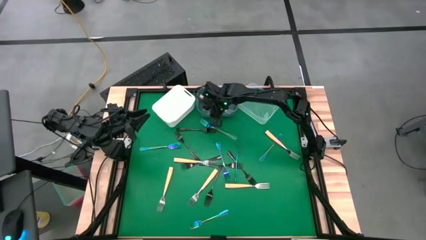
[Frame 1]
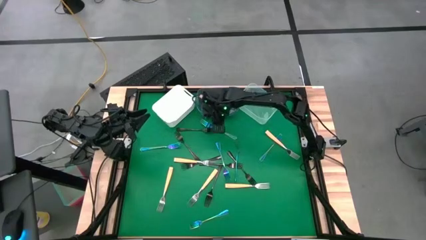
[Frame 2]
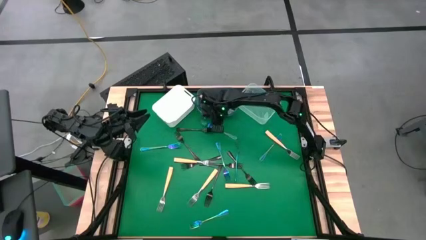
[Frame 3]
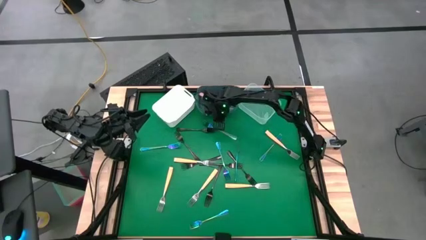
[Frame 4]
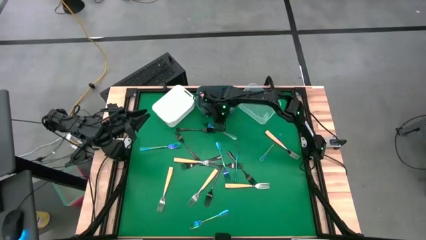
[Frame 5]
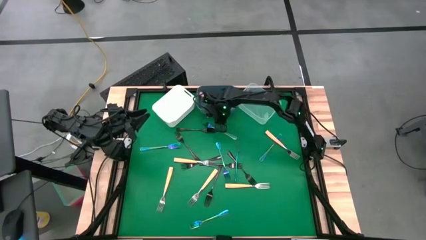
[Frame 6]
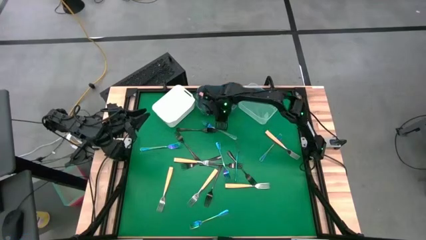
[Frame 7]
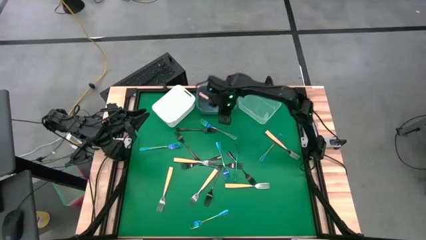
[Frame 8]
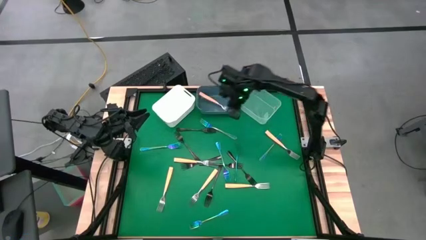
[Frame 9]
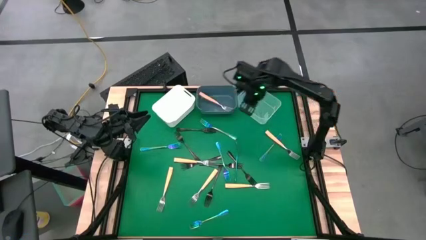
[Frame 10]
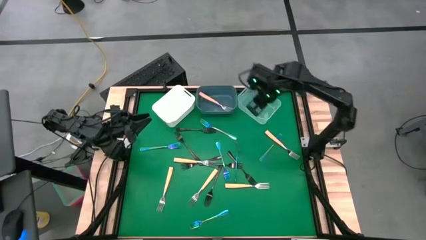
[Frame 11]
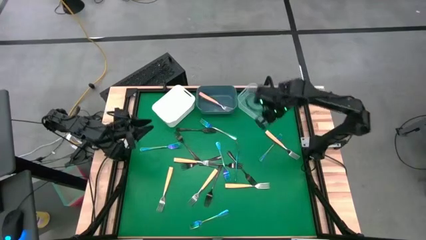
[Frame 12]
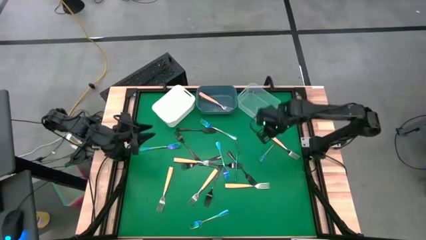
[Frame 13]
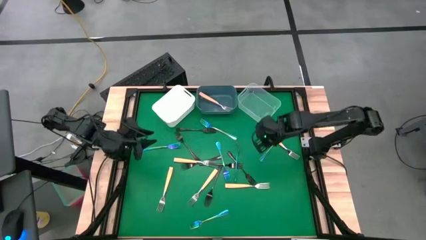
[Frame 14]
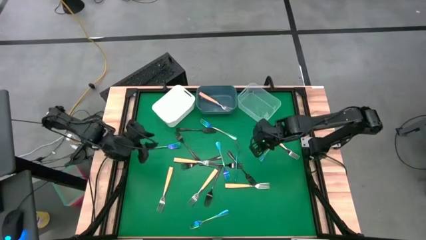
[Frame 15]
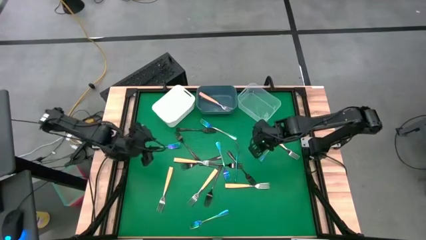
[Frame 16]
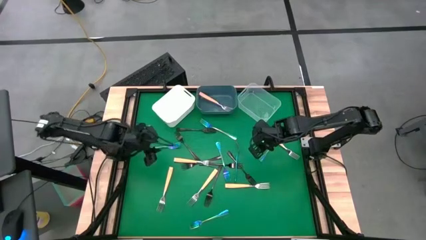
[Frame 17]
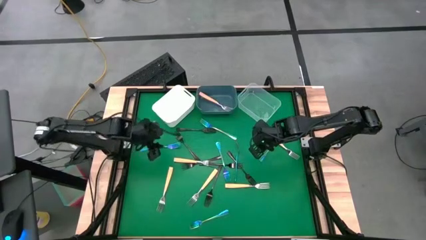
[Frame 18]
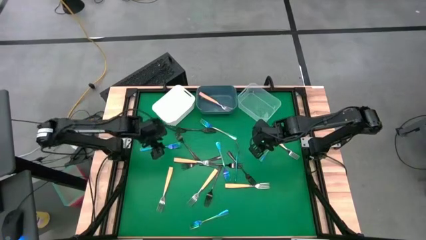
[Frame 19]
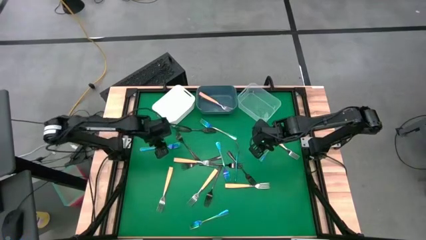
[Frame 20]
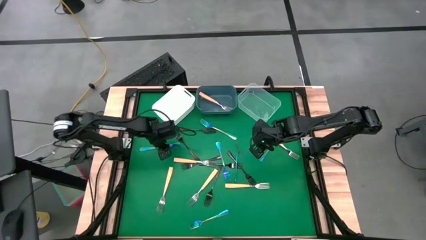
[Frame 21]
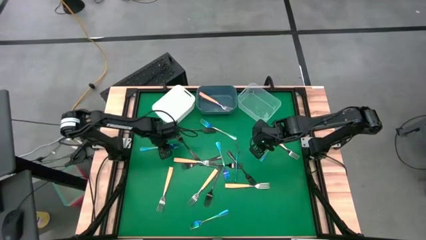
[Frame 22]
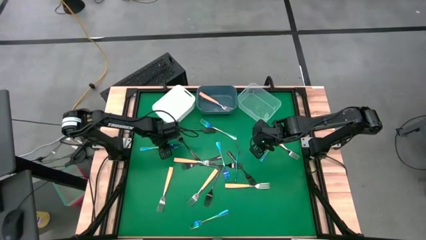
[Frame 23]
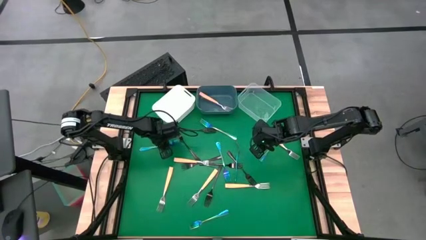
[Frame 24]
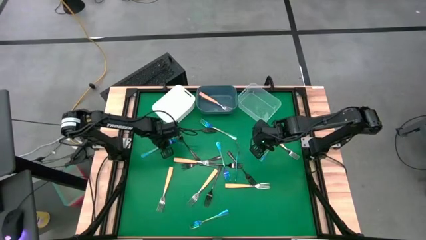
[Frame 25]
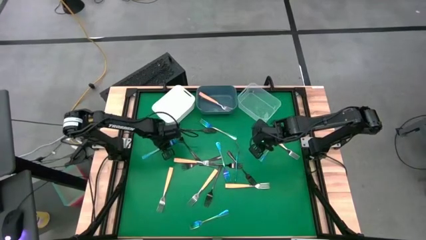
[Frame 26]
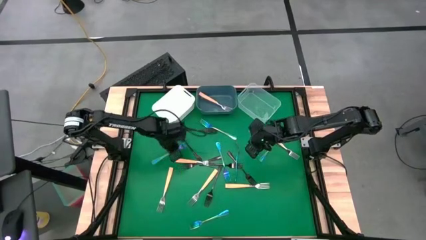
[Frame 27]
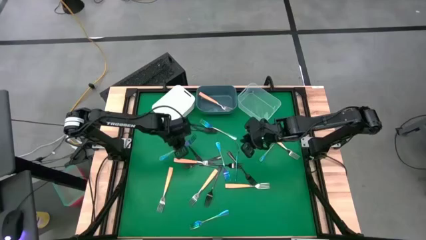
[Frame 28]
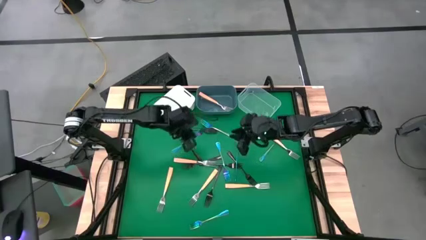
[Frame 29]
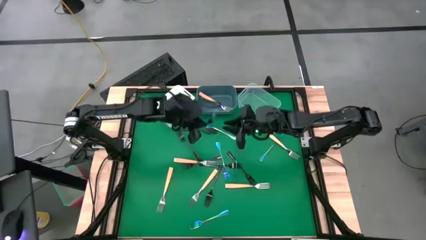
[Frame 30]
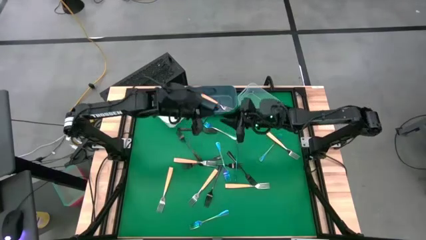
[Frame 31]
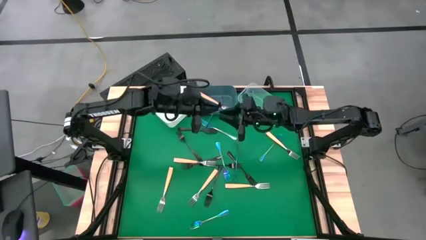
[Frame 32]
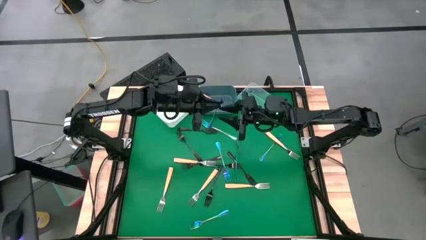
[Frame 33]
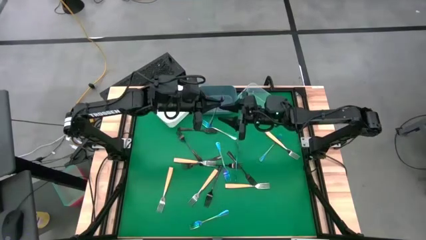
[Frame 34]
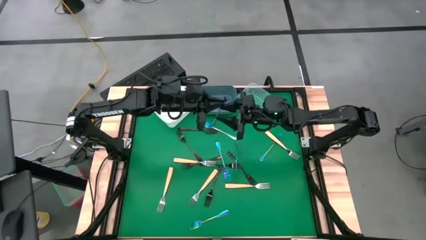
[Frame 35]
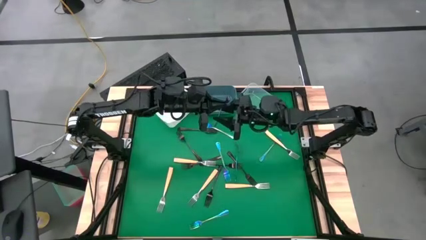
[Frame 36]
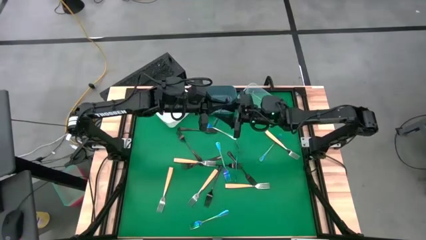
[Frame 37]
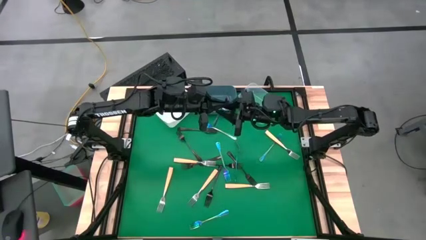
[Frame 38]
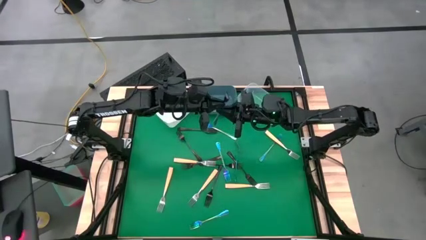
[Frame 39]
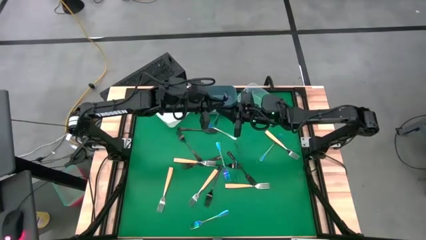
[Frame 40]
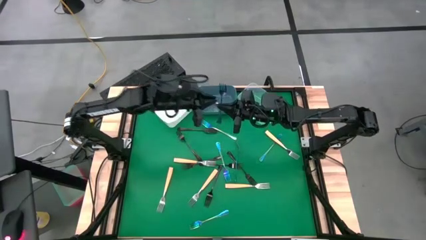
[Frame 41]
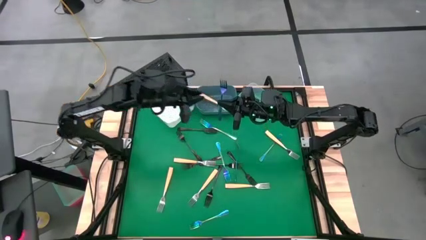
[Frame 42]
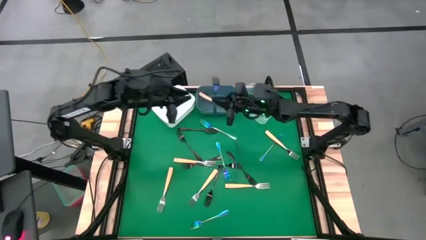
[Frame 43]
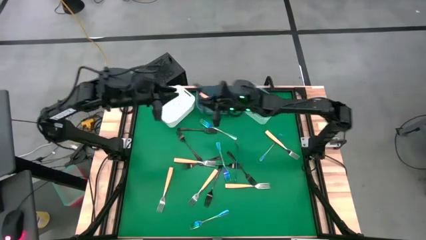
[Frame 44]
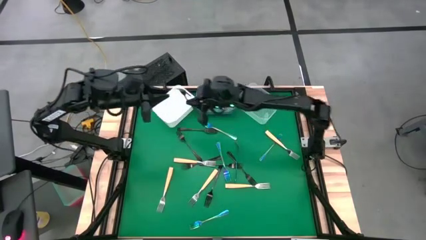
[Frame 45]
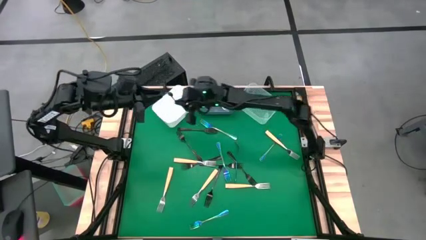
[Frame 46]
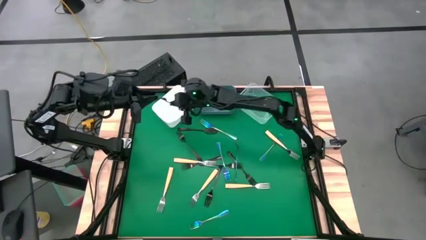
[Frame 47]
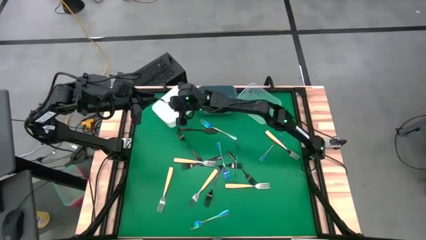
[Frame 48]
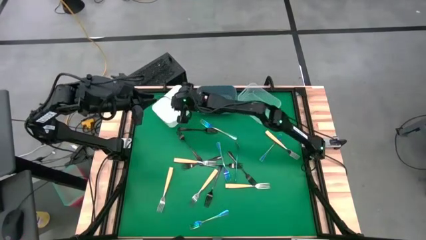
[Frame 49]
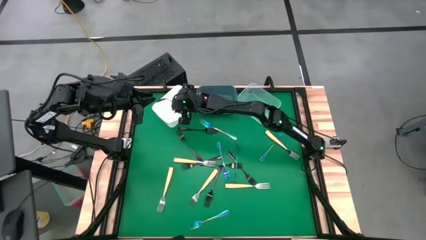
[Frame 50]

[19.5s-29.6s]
Task: Sort silverware by color (type)
Put the blue fork into the white bin
